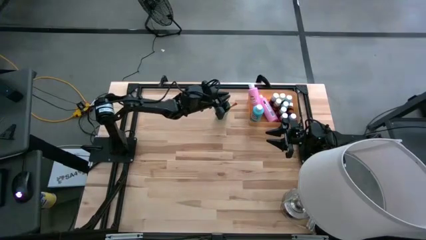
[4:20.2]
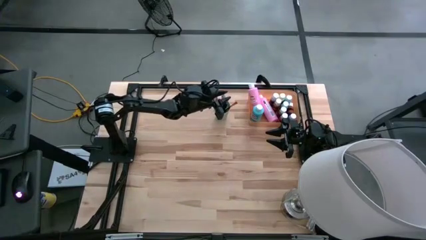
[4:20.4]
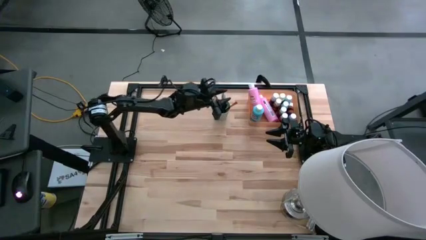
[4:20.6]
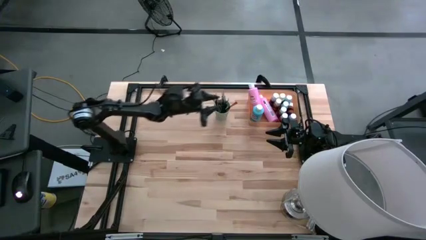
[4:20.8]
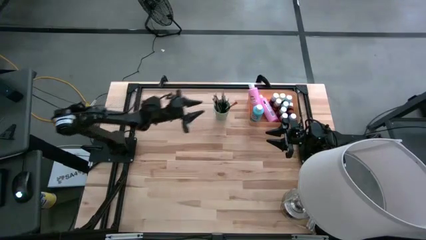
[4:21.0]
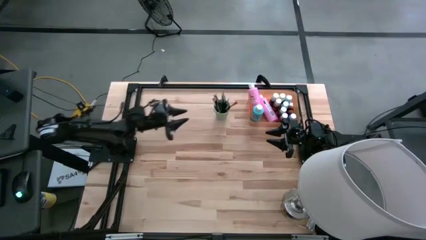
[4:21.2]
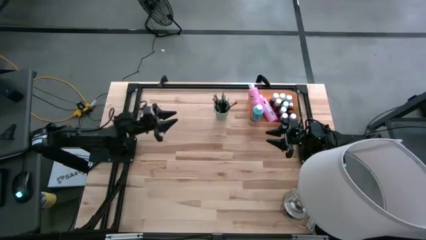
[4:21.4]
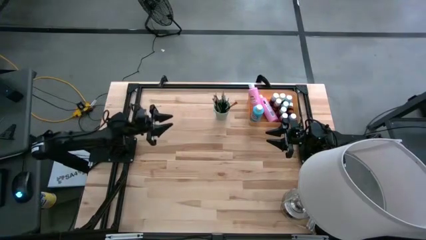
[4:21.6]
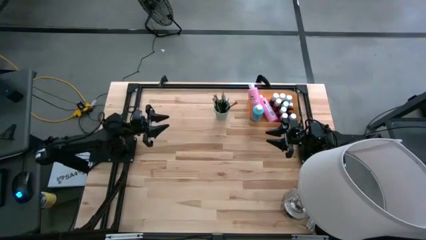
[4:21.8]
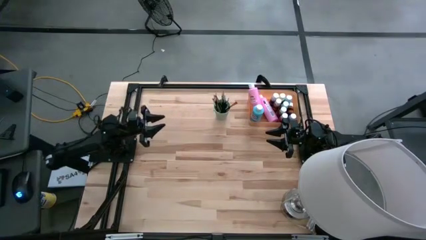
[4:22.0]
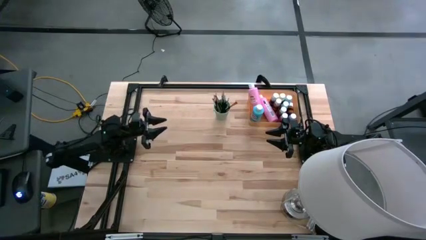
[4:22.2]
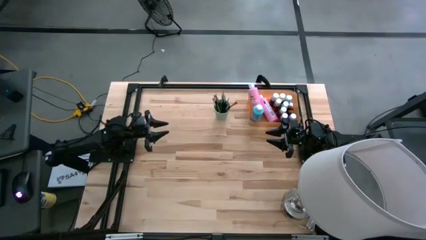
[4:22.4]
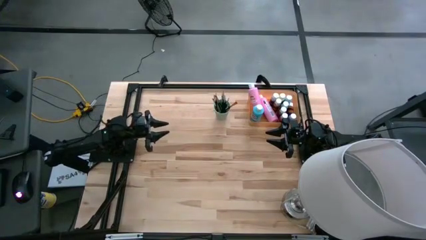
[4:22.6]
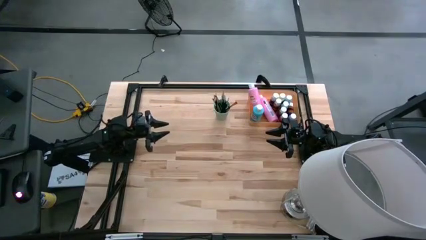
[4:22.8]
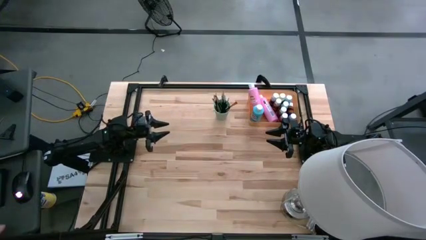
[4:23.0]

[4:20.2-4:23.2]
Task: Pick & Place Paint Supplies
Return to Home Position

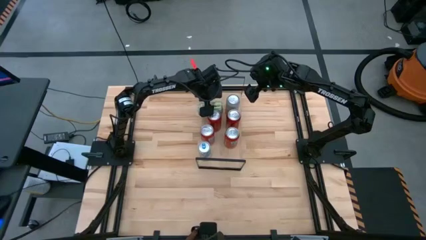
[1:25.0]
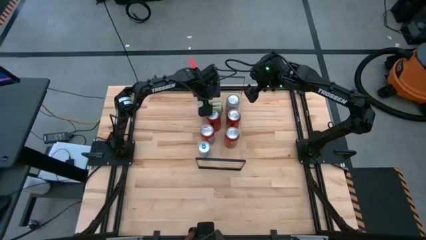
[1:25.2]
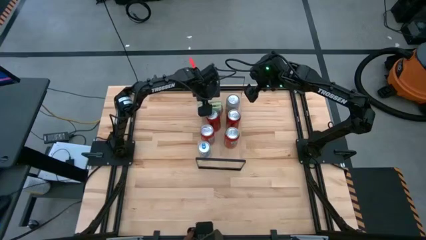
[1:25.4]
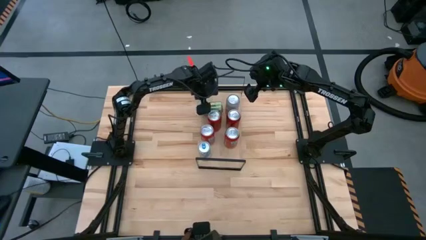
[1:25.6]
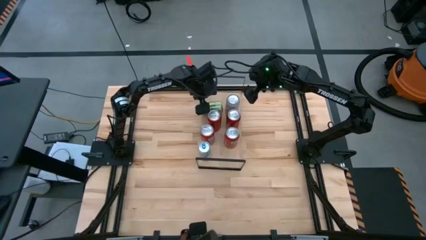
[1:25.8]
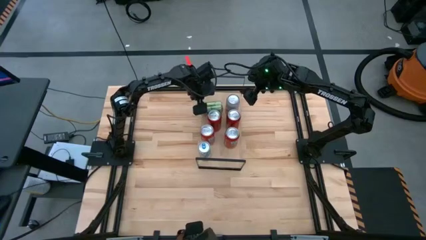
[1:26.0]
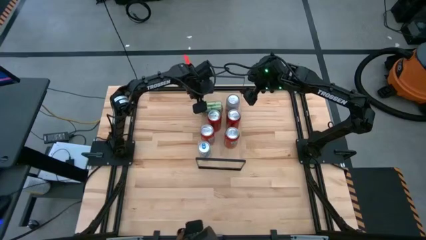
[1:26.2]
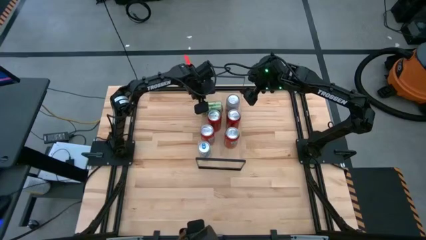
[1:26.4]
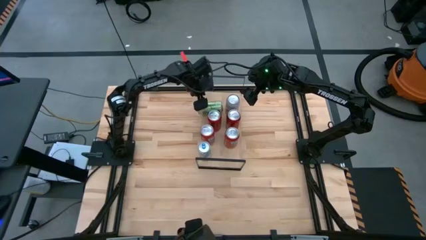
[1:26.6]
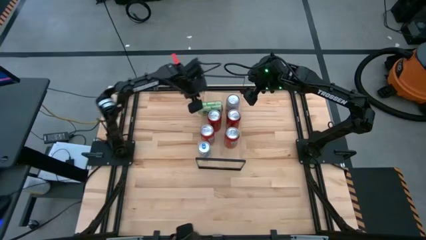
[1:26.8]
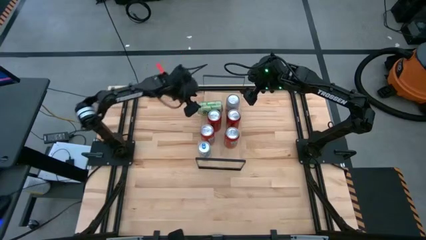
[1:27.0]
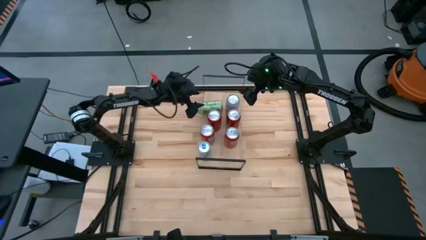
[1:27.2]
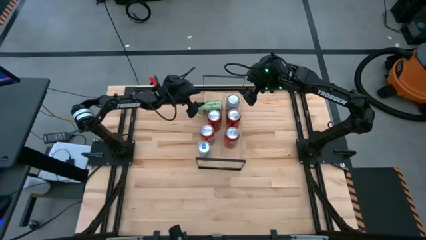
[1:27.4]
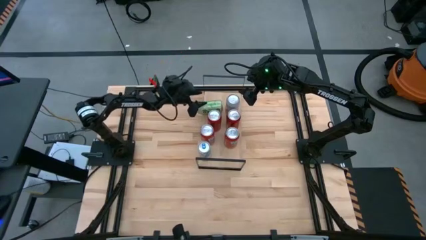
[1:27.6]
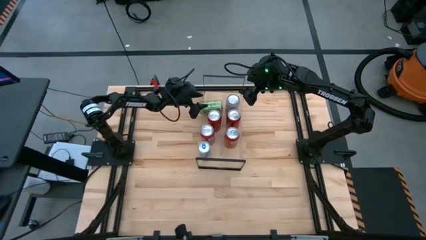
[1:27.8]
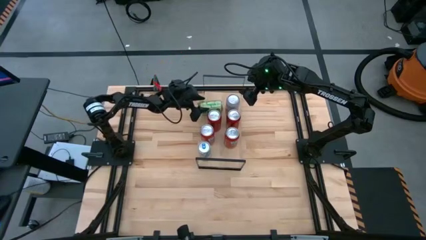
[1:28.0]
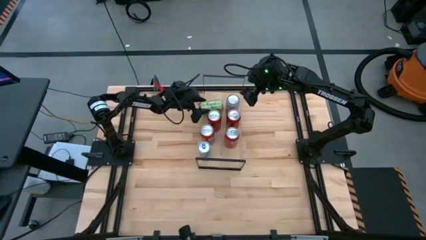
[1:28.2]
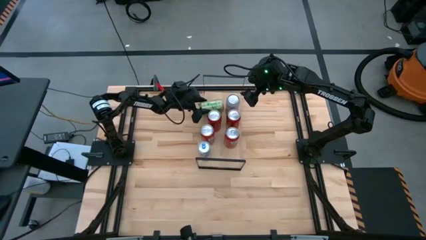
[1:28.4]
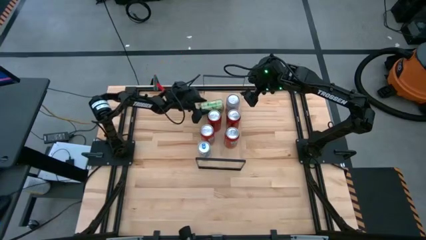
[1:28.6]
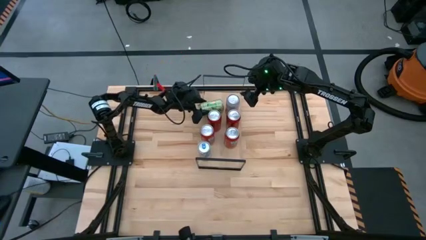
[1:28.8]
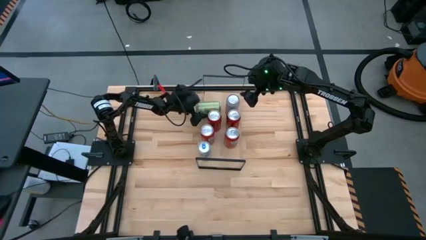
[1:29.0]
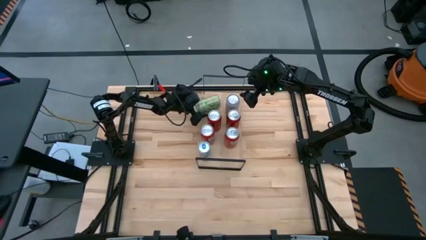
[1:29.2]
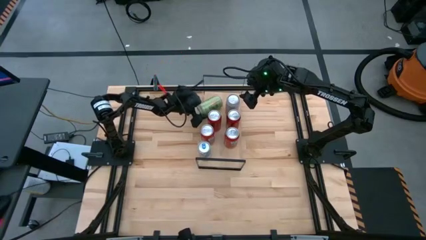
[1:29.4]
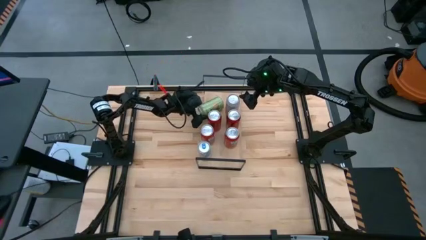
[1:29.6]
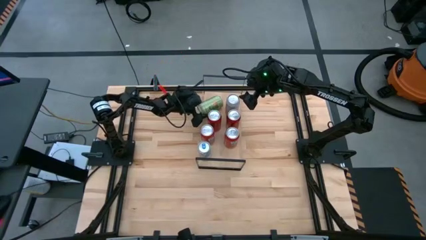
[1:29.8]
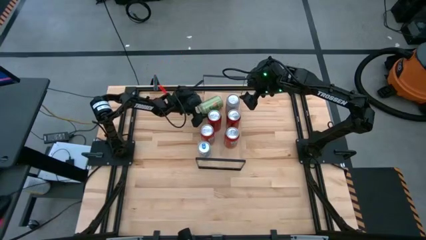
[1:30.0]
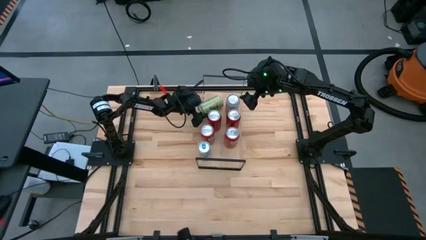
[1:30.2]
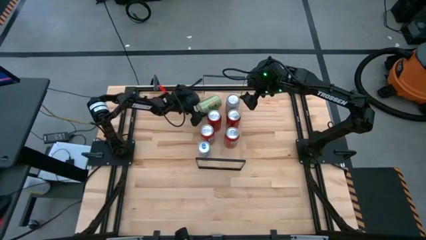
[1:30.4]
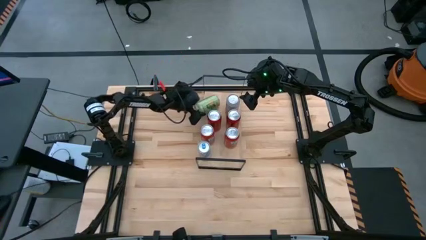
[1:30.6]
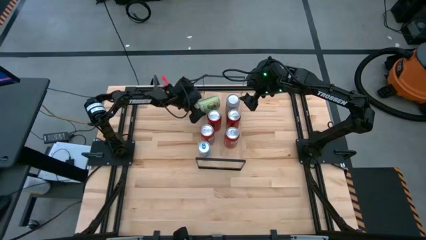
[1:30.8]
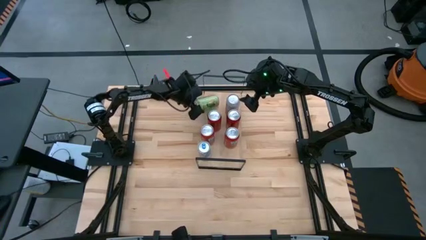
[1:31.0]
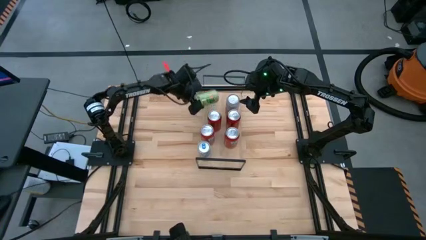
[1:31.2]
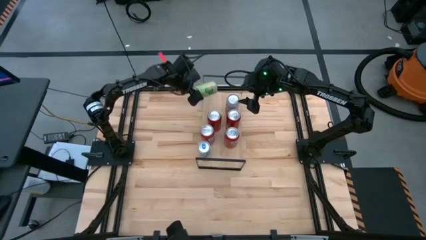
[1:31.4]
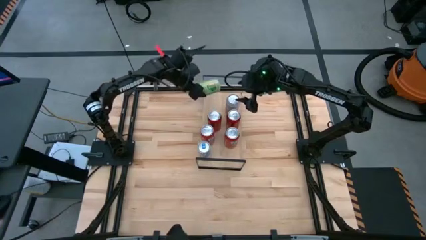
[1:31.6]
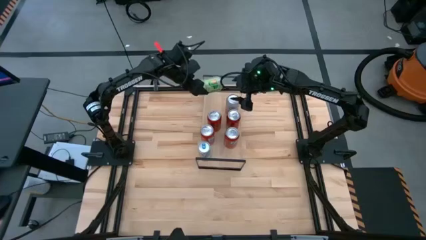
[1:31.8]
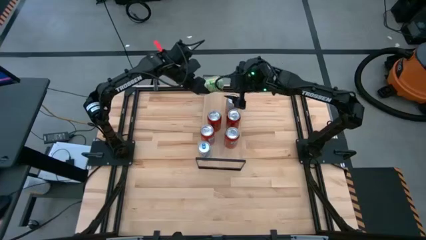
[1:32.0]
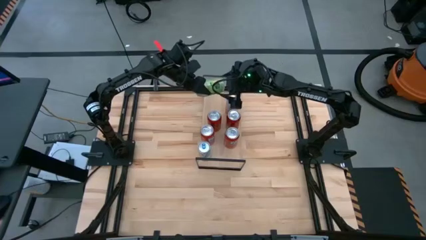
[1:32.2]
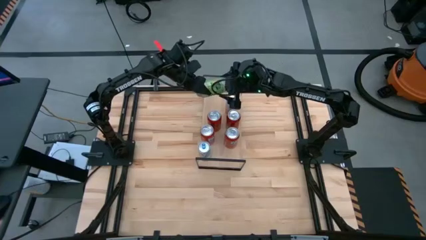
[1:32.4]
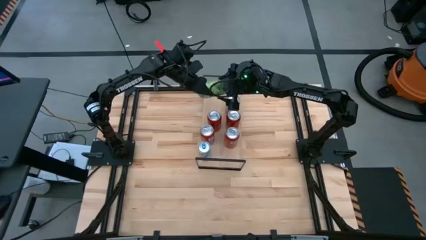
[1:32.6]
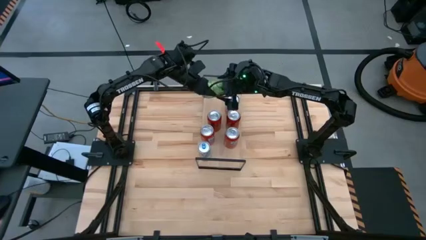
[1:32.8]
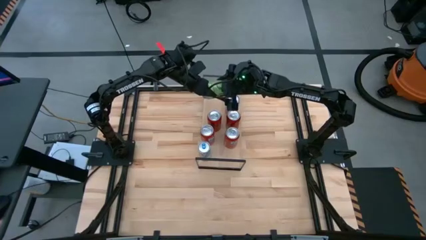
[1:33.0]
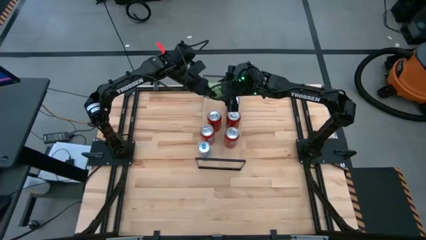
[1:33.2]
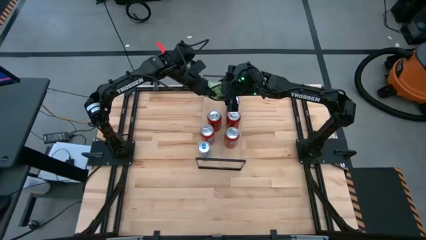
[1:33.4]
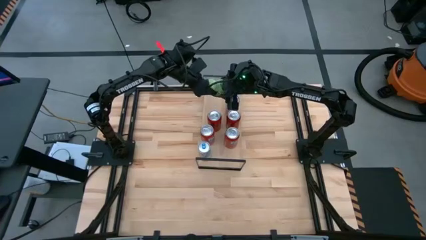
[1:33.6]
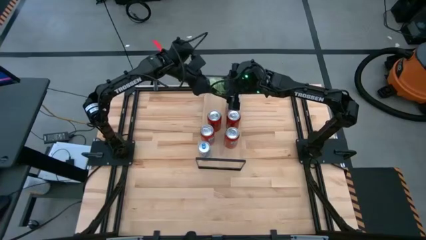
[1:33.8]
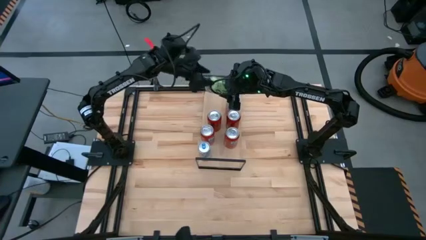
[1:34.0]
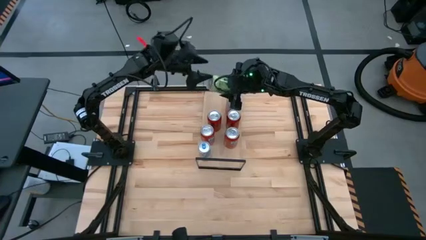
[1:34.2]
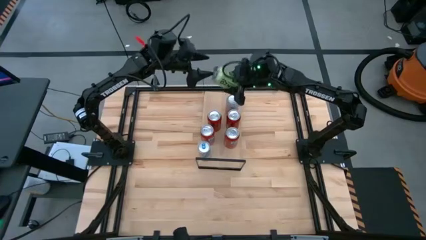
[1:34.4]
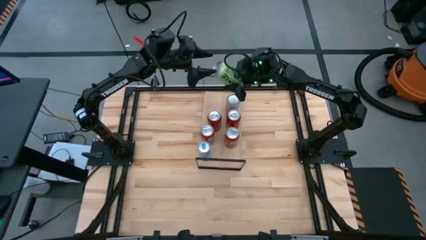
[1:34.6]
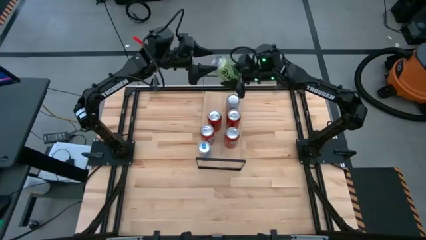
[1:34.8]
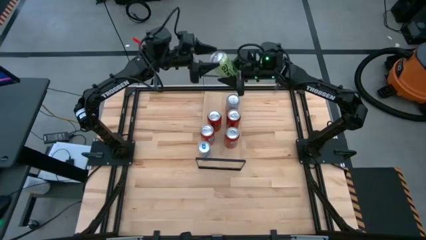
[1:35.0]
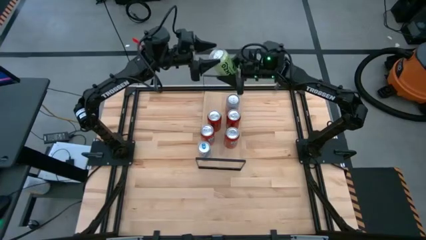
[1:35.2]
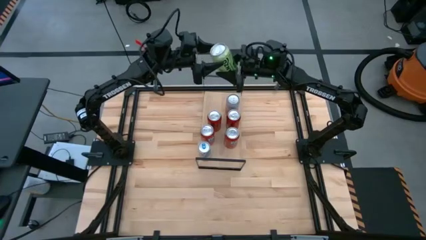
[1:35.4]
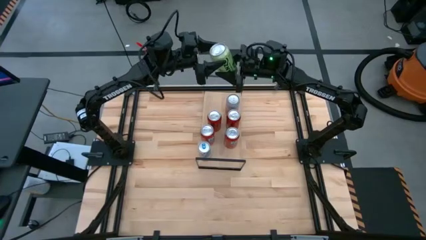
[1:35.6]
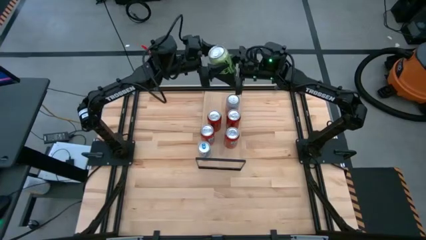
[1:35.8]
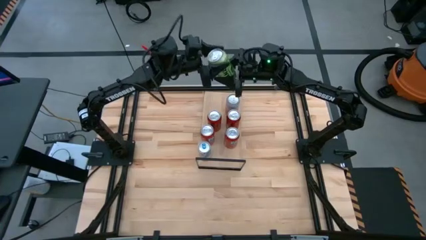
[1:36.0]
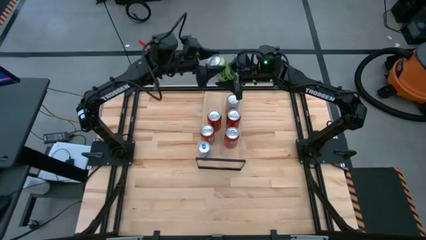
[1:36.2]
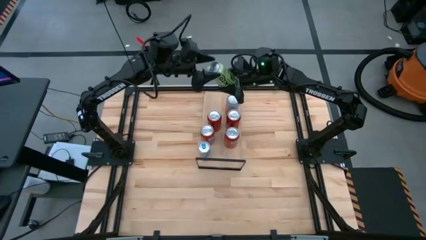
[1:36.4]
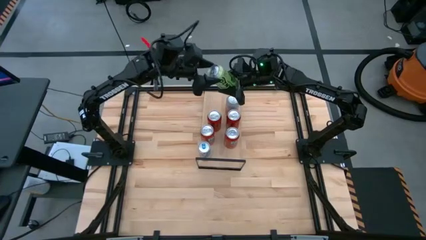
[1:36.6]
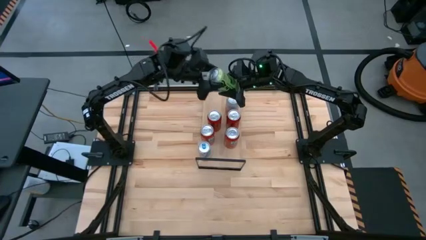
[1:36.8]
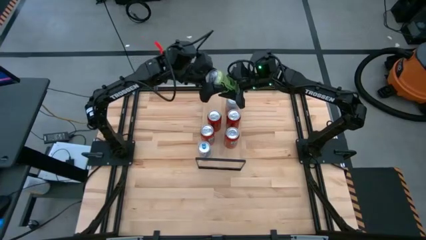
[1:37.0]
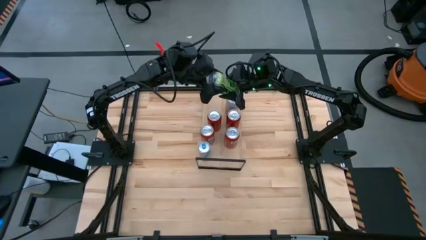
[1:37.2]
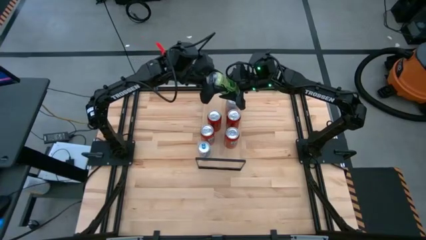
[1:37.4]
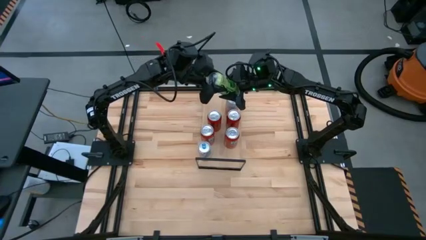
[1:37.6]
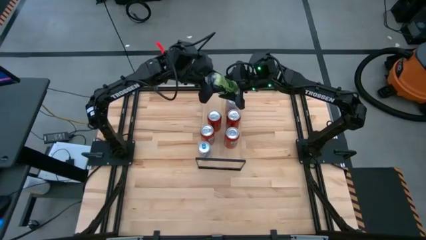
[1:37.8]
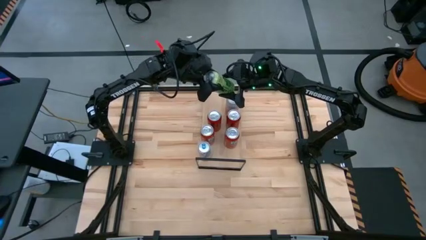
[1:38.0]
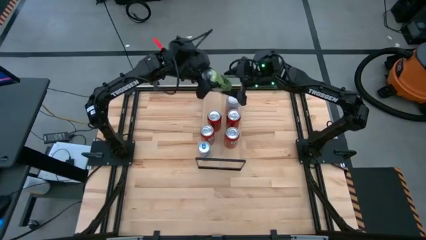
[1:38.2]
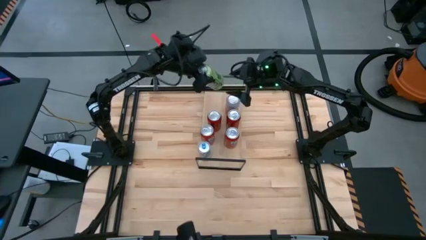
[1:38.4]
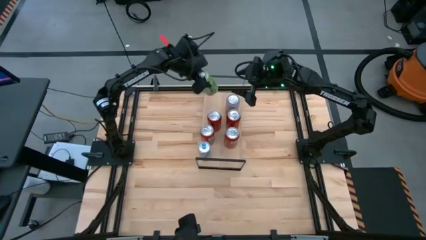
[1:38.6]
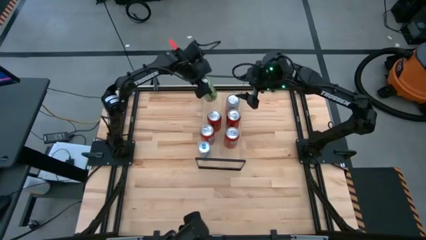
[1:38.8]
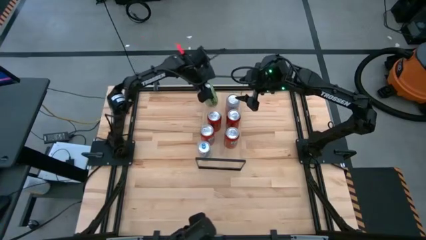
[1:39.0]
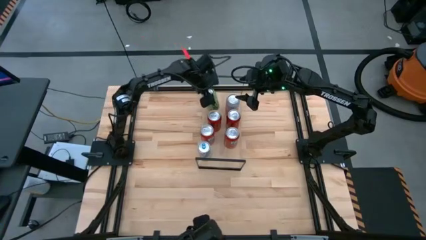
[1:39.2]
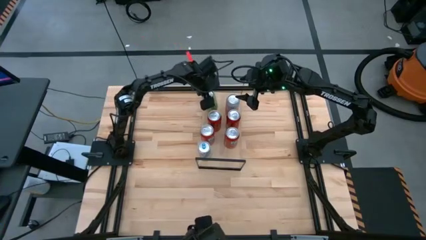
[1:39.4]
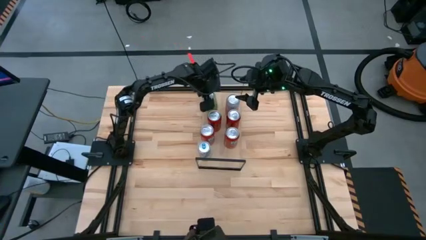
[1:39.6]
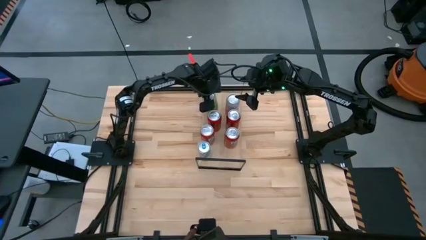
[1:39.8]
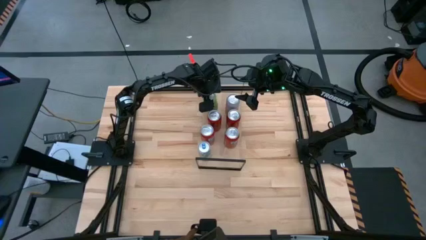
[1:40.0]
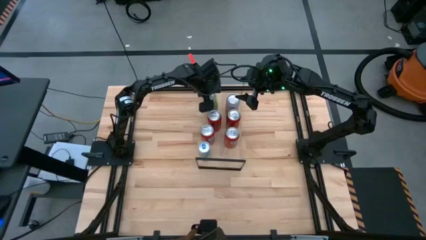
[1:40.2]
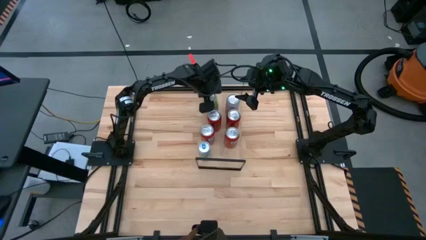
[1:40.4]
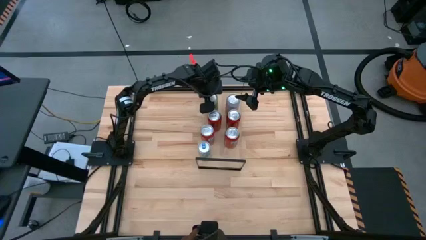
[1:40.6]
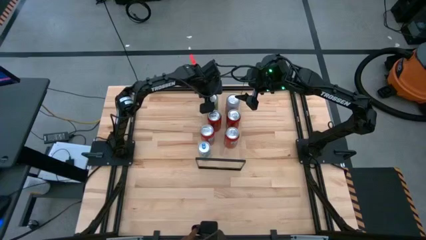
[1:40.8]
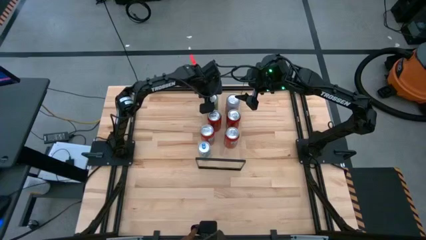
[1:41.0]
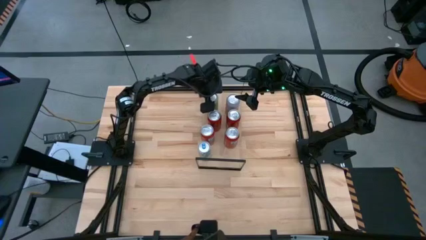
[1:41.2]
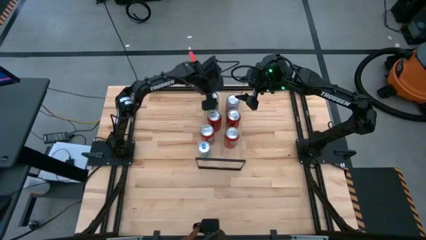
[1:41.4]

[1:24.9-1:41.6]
Task: Place canned beverage on shelf
Put the green soda can on the shelf
